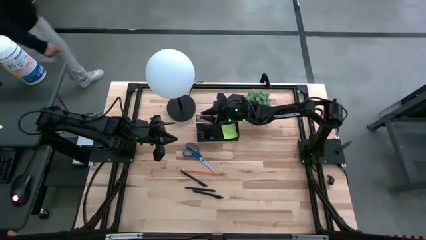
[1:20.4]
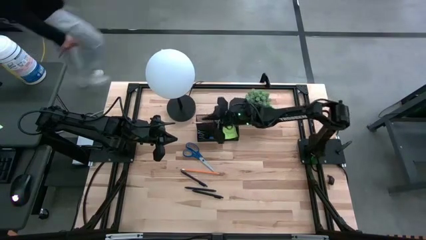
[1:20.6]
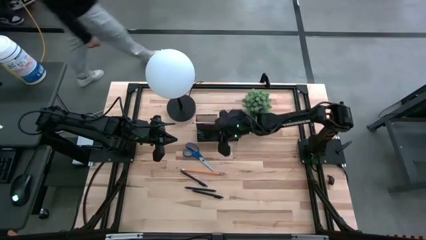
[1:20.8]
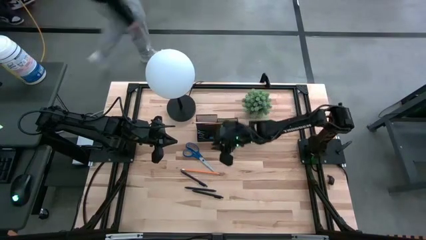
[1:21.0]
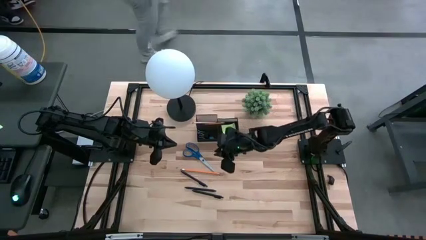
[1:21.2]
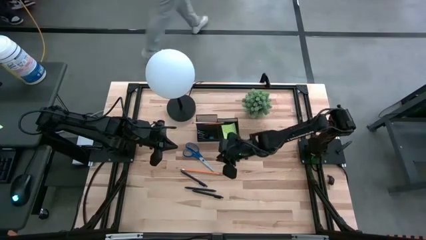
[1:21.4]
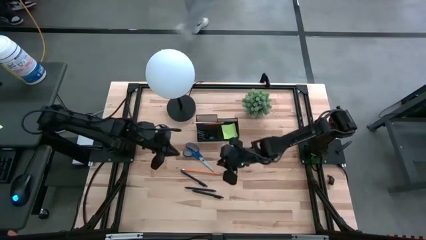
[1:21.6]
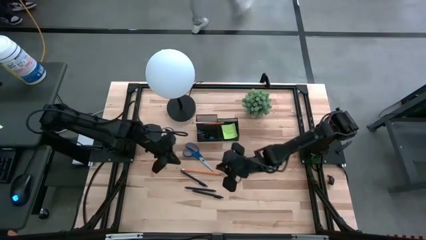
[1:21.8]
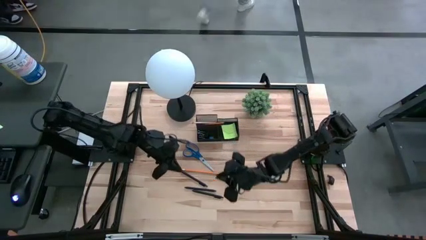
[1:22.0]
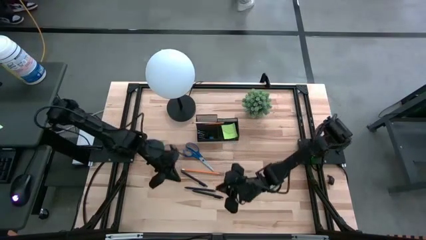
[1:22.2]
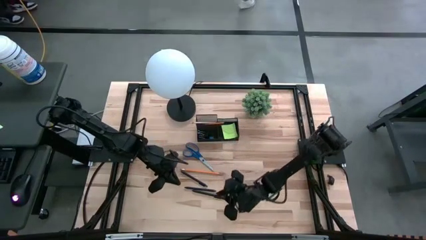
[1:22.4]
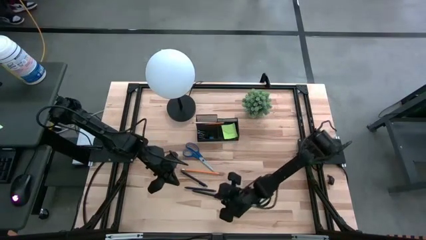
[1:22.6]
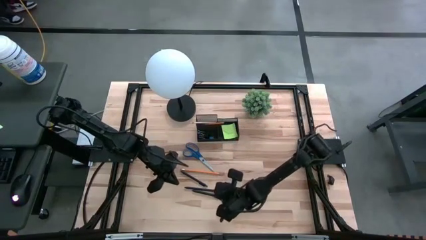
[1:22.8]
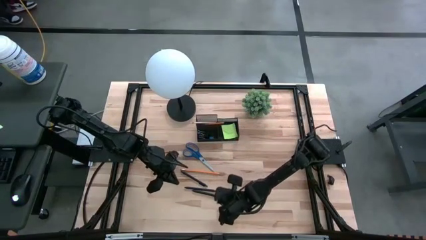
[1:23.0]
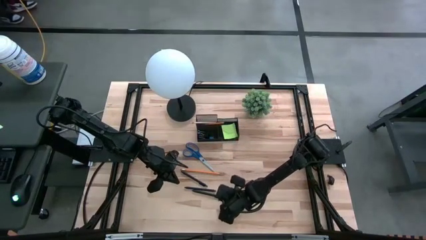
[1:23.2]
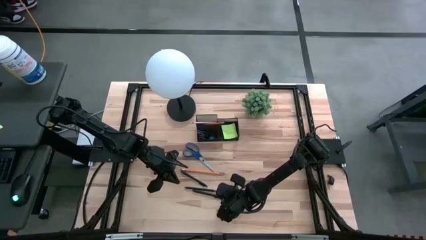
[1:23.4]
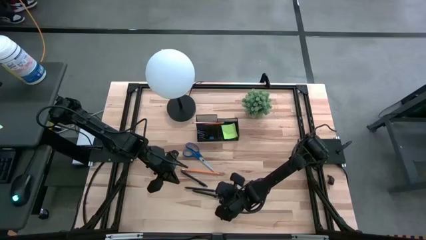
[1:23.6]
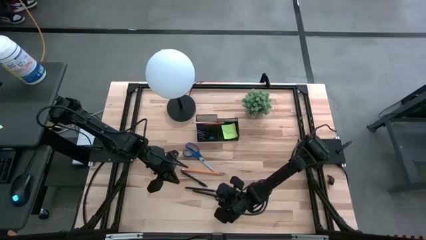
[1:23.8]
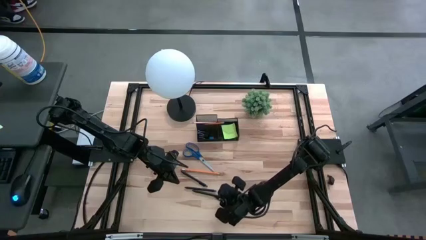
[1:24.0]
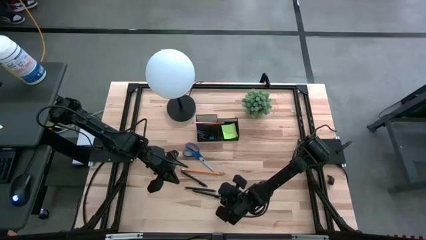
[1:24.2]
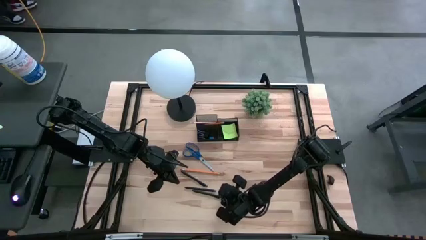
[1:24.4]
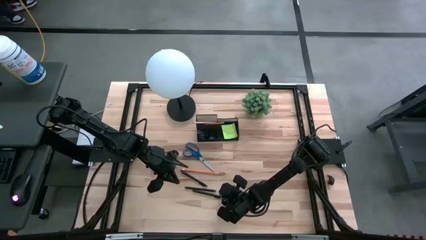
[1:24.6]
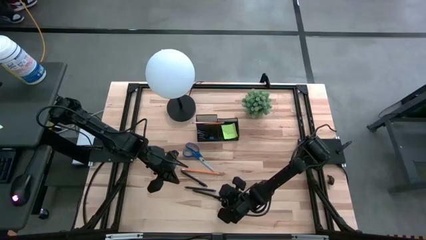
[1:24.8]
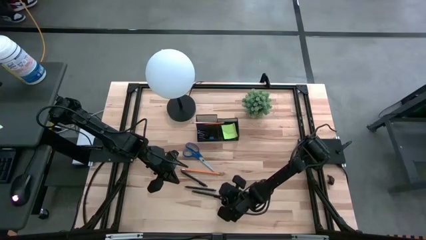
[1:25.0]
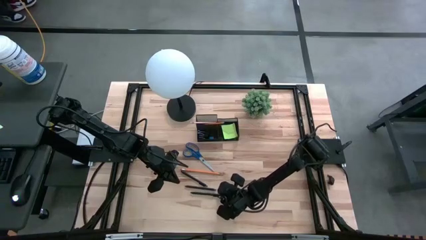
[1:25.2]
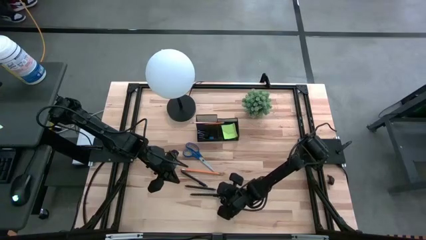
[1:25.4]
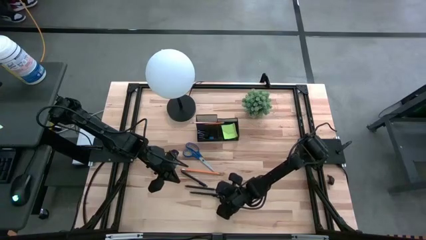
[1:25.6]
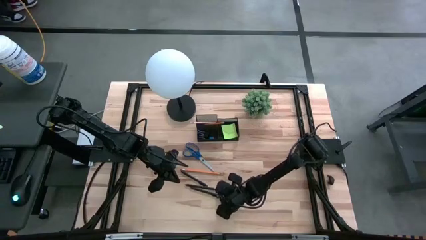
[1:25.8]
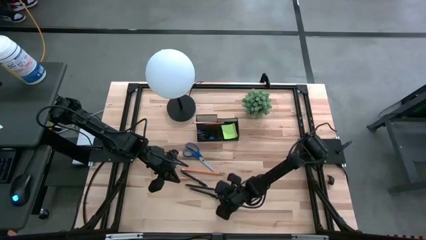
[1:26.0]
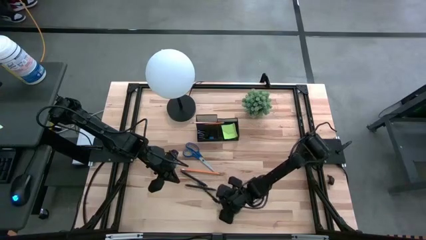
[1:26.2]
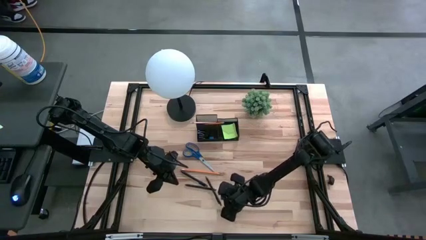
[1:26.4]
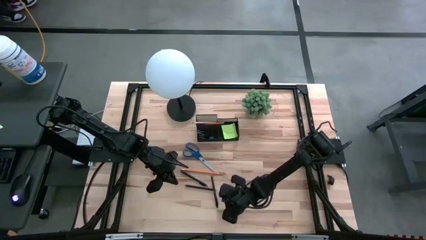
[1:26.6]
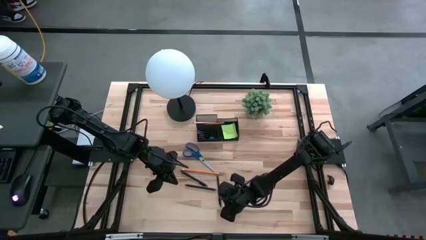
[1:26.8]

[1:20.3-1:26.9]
Task: Pick and place office supplies into organizer
Put the bottom center black pen into the desk organizer

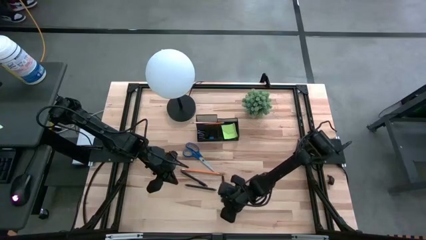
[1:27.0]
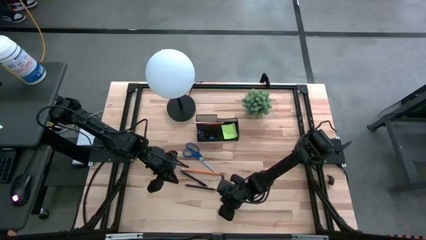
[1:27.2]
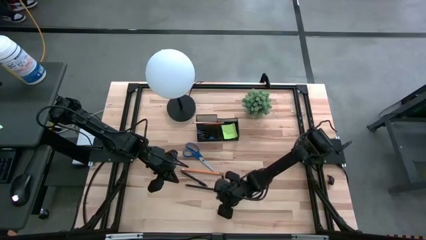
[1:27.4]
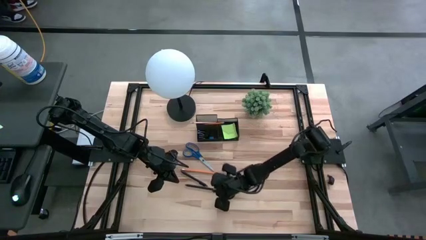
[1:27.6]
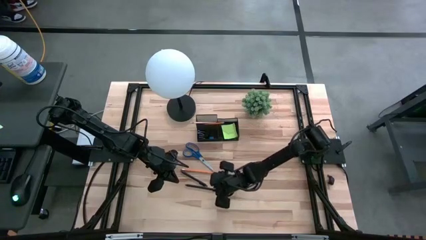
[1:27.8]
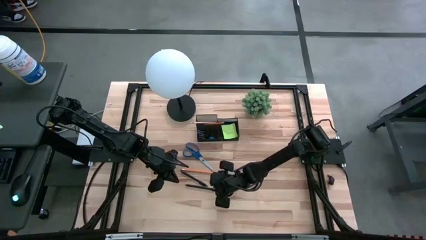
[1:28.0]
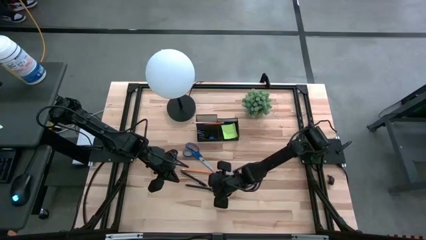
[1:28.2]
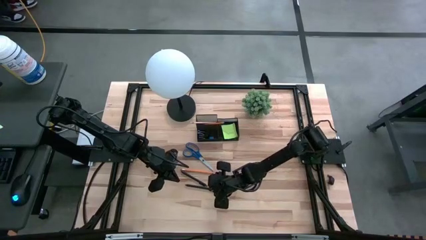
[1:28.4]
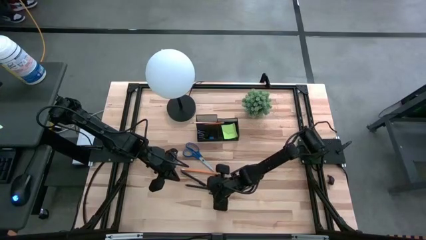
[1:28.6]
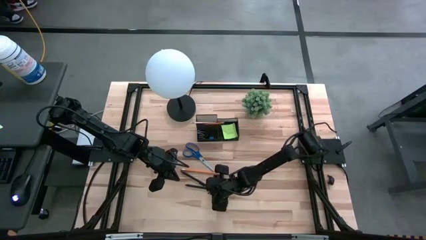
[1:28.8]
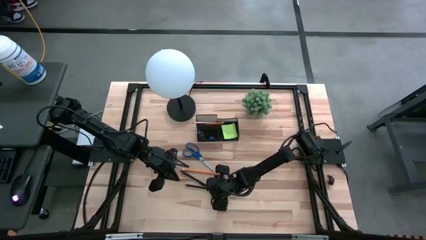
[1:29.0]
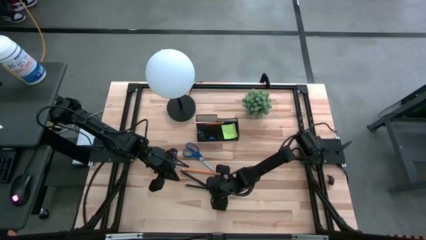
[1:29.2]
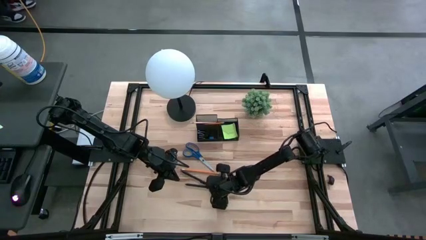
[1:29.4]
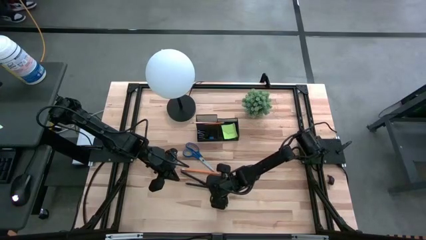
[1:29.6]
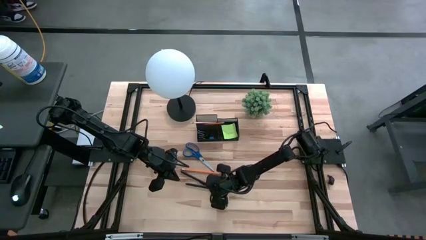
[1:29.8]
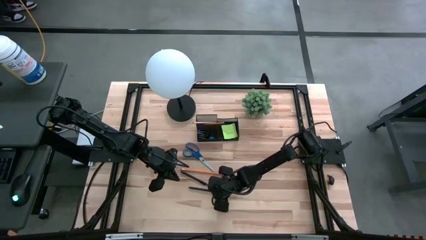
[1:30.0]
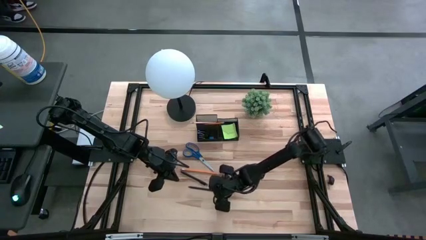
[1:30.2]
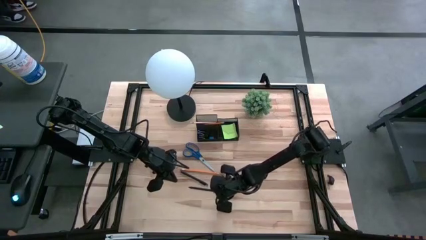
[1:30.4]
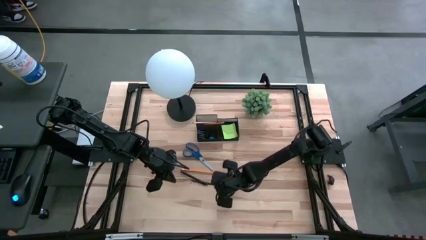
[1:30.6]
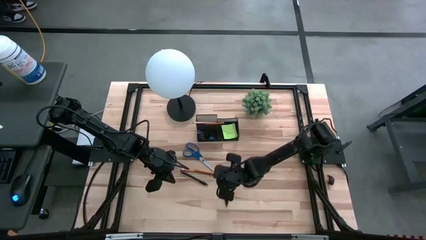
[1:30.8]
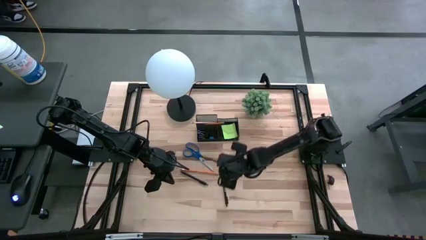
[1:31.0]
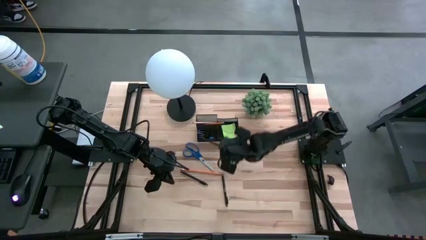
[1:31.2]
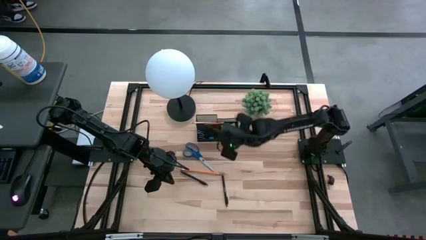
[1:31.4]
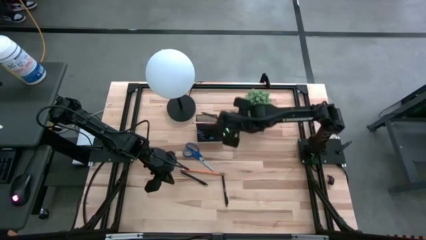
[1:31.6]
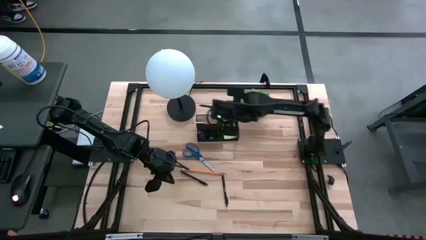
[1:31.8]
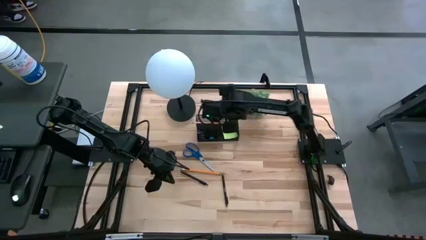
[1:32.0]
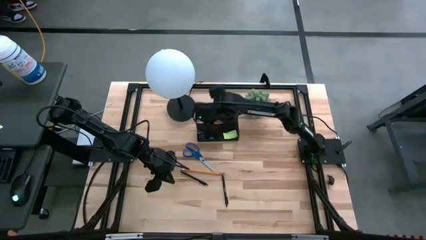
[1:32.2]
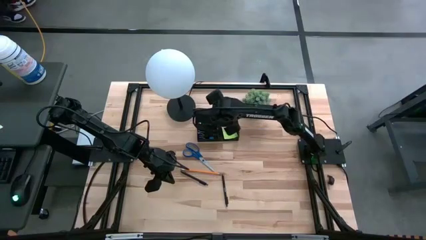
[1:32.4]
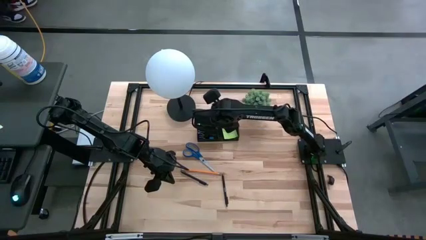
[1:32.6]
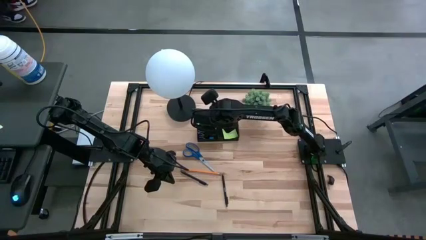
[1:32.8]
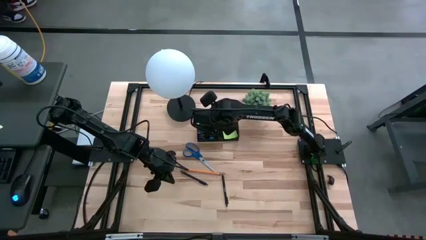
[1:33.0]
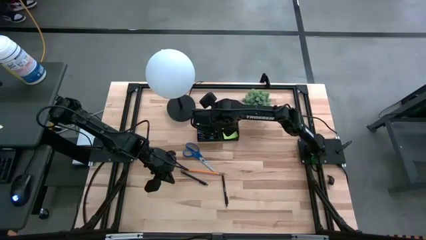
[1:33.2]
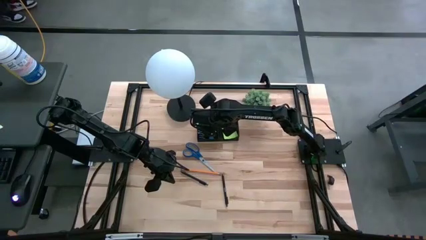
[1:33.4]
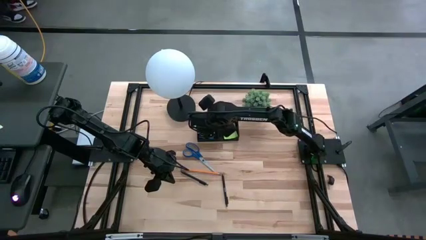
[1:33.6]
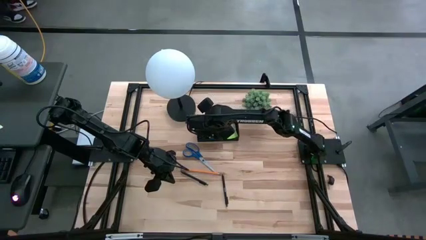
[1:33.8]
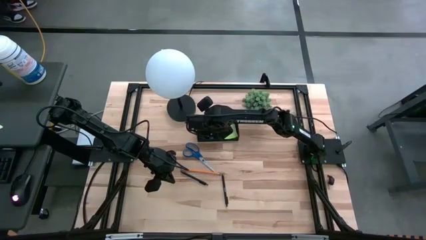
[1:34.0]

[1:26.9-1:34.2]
Put the bottom center black pen into the desk organizer
